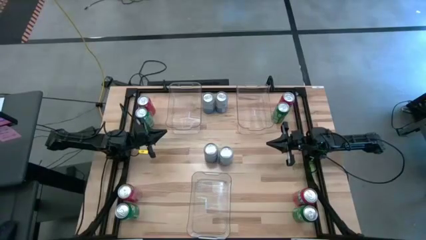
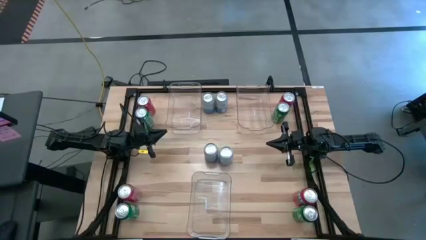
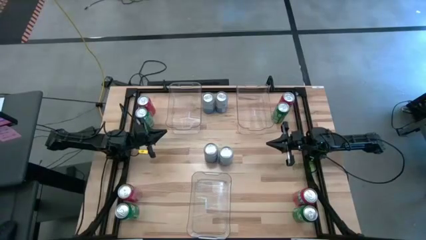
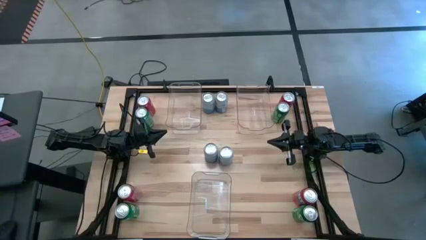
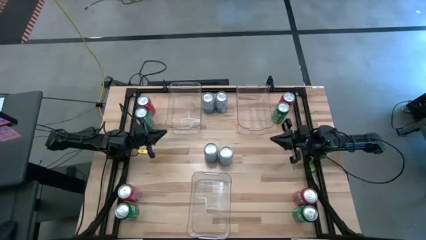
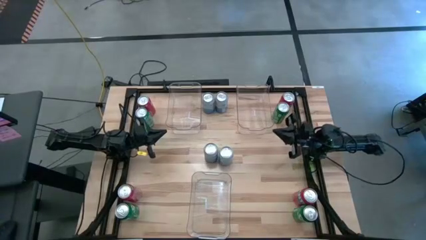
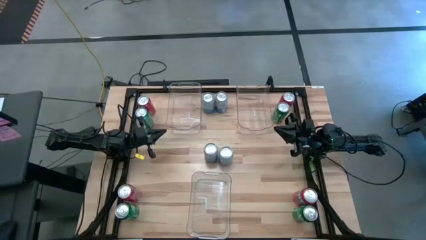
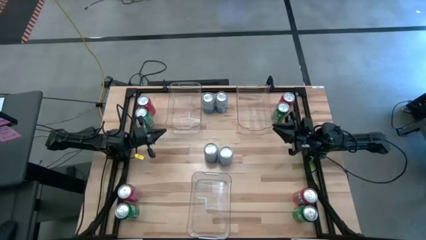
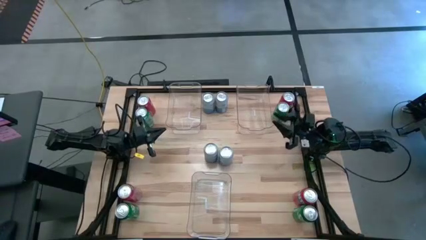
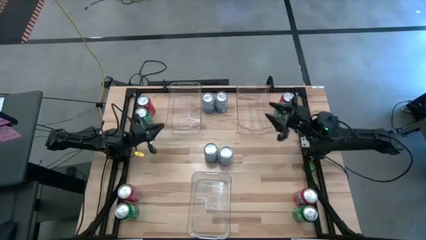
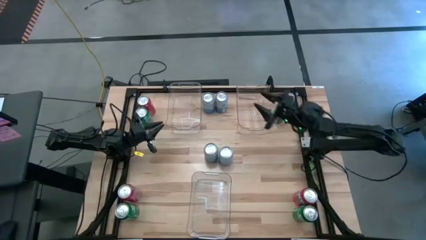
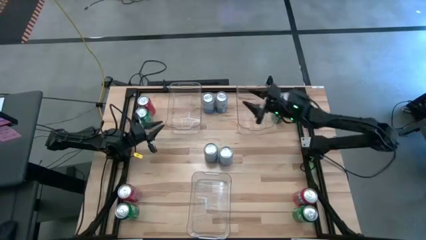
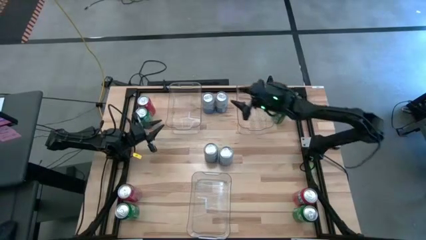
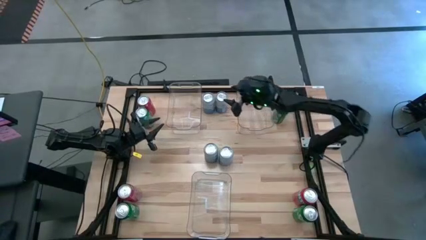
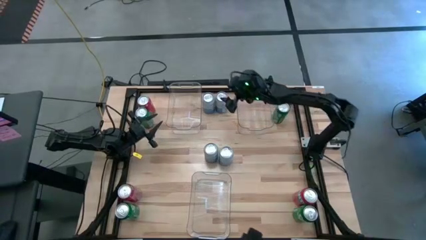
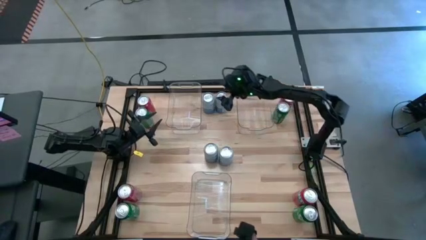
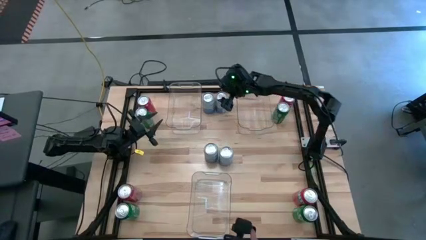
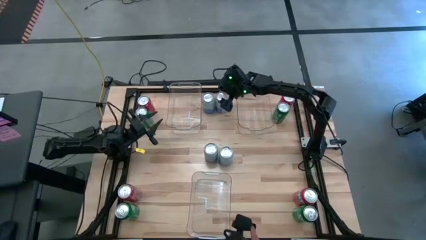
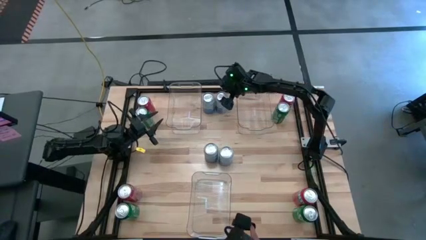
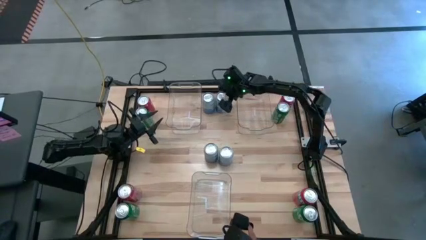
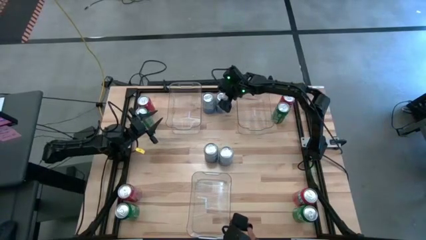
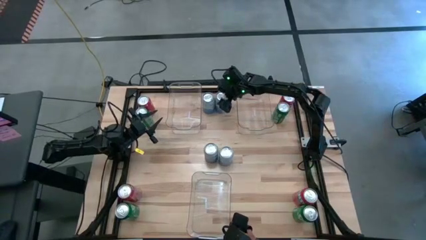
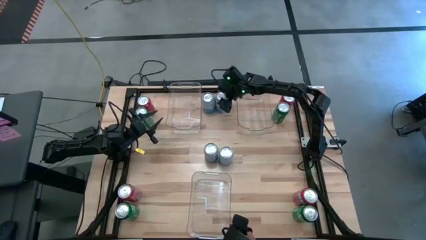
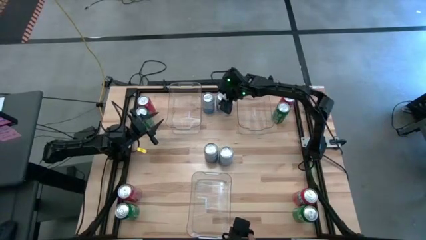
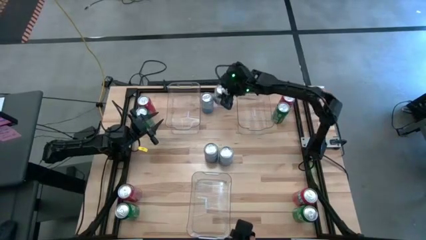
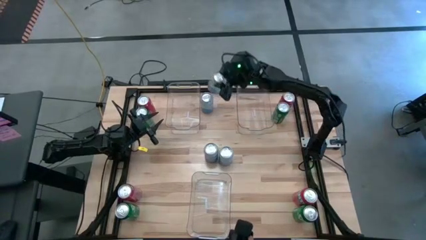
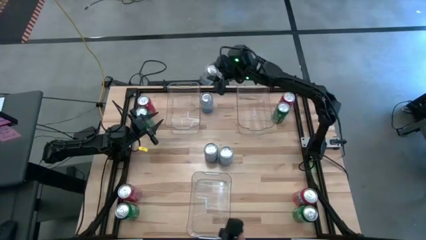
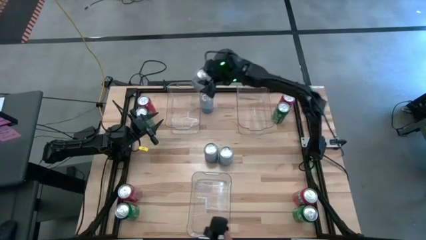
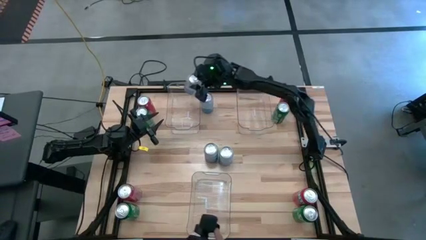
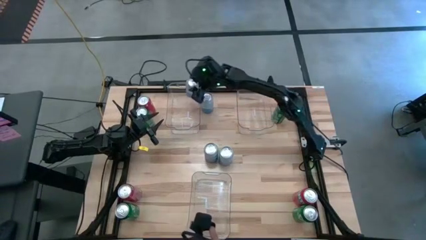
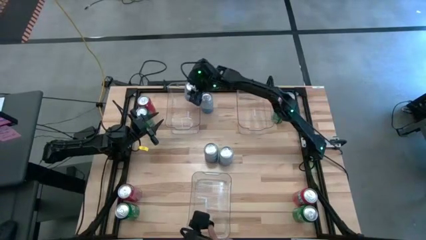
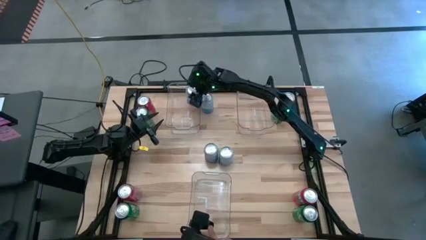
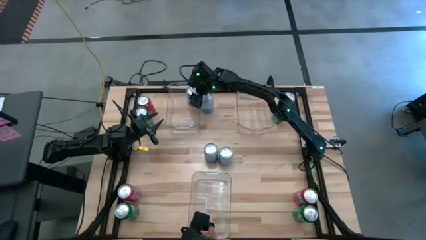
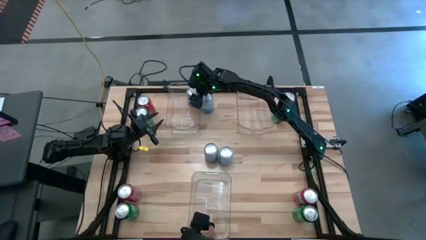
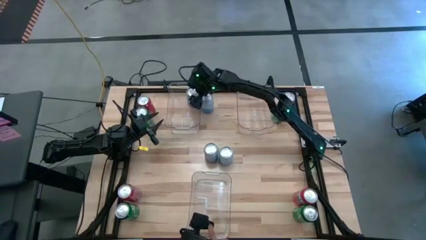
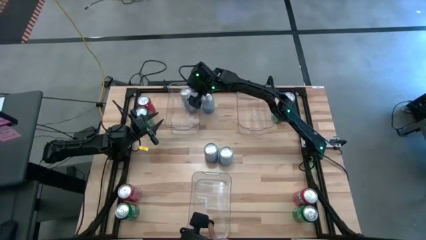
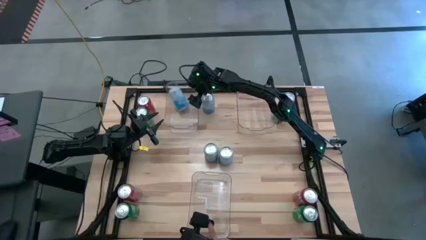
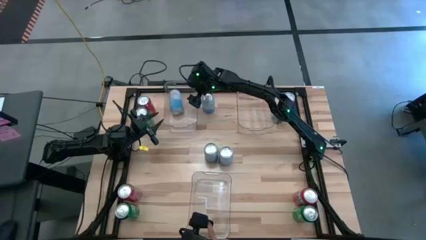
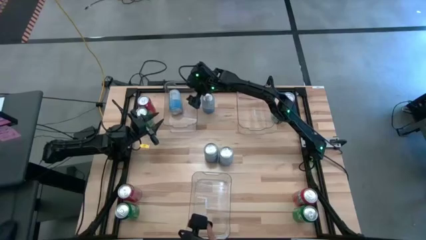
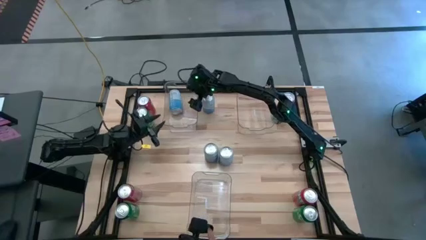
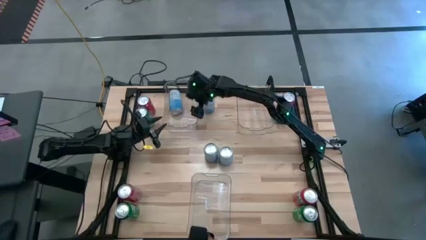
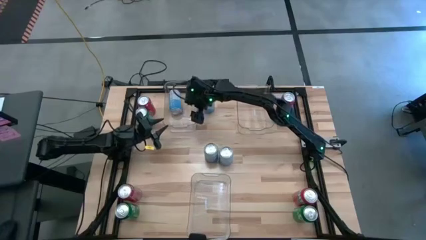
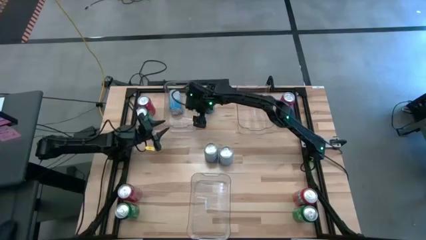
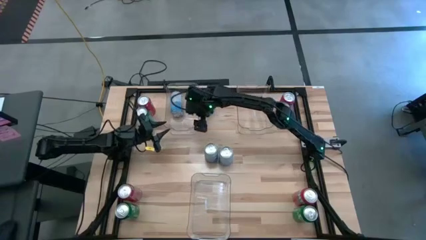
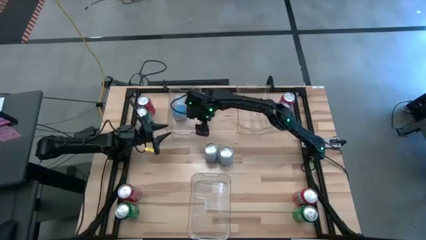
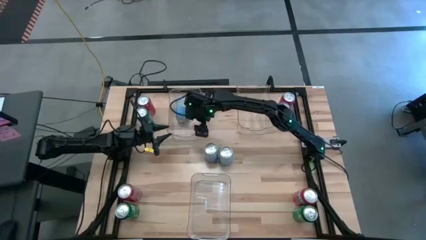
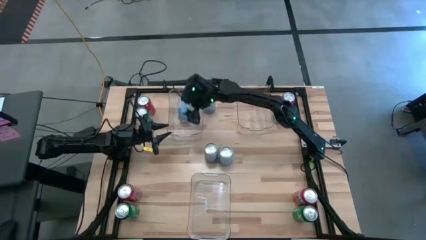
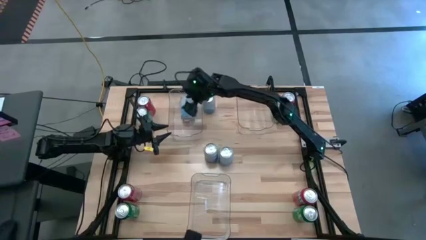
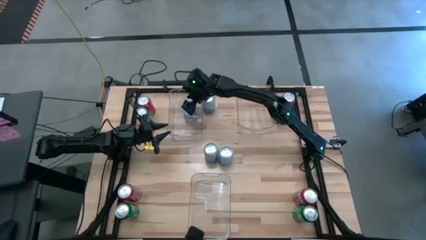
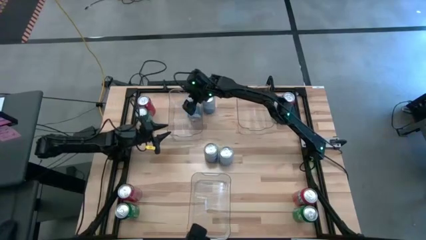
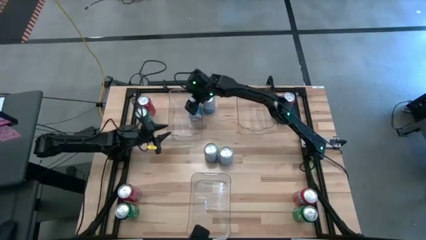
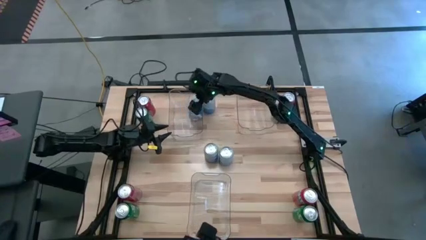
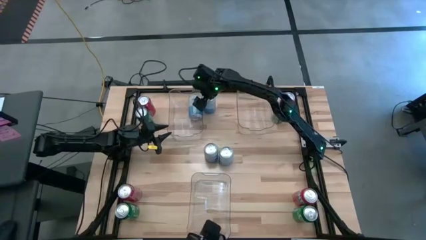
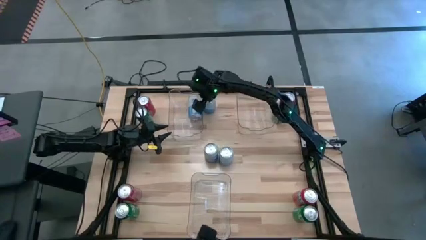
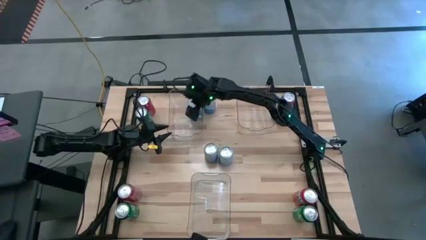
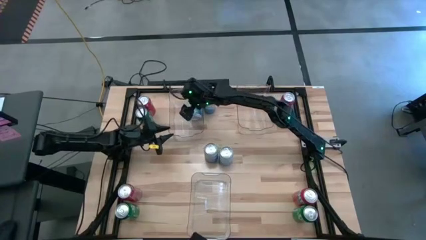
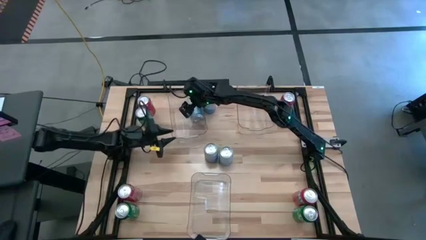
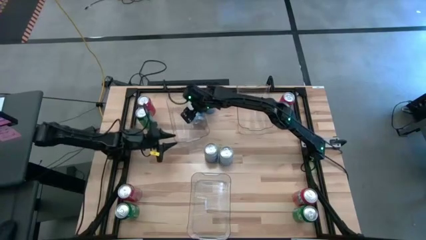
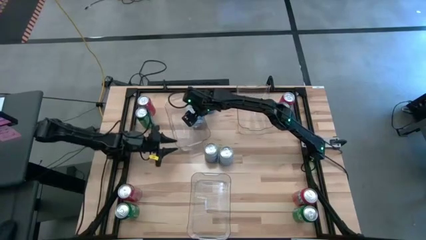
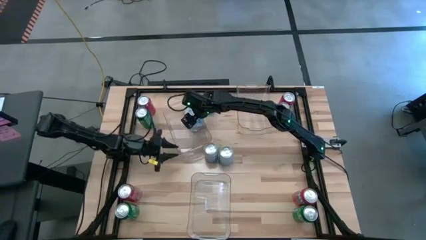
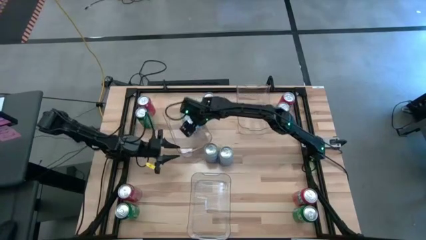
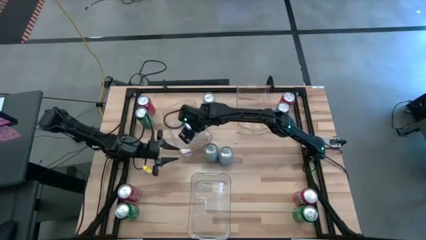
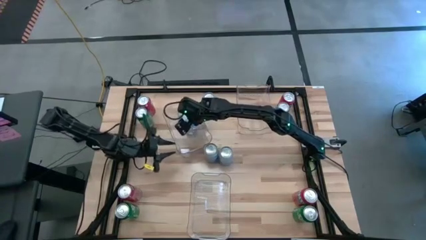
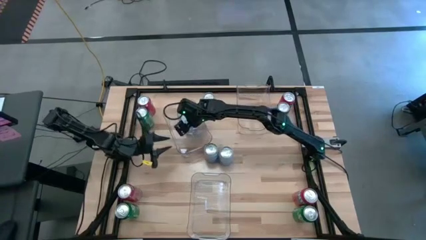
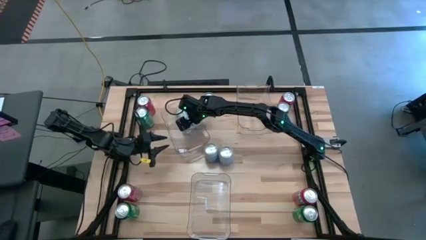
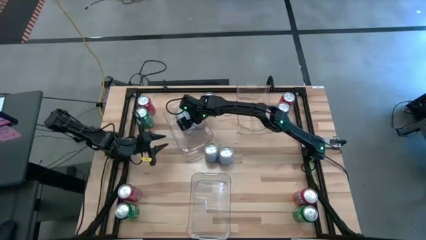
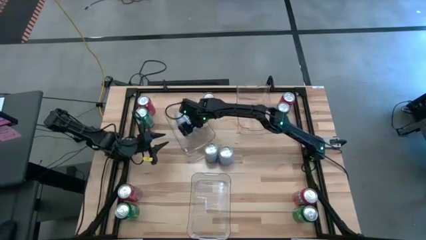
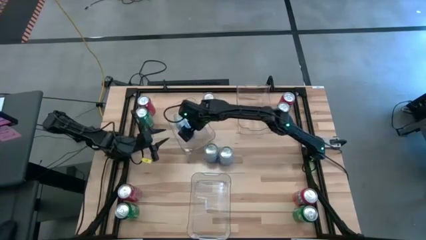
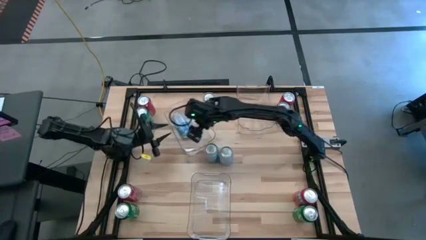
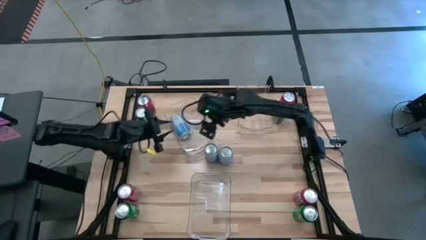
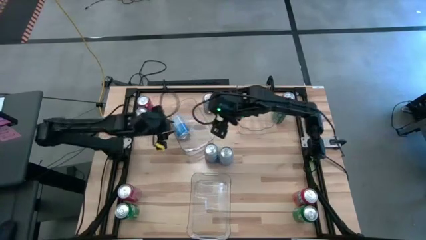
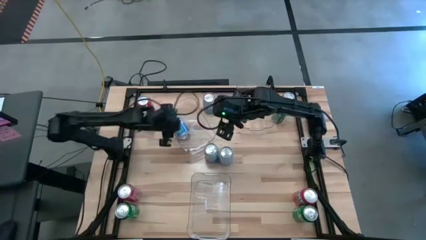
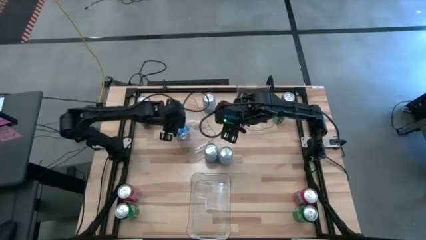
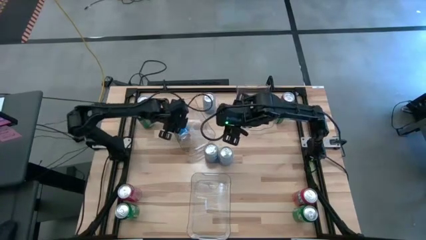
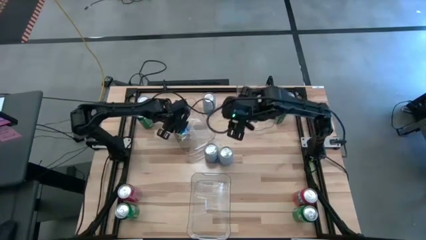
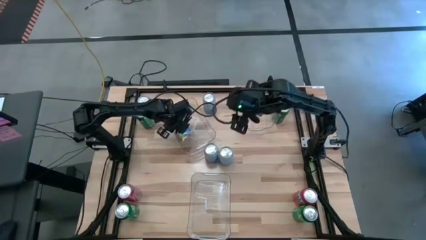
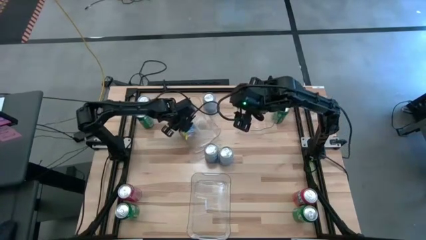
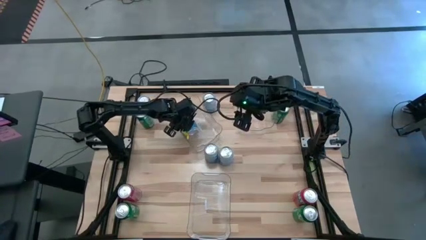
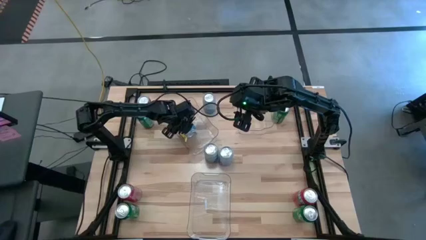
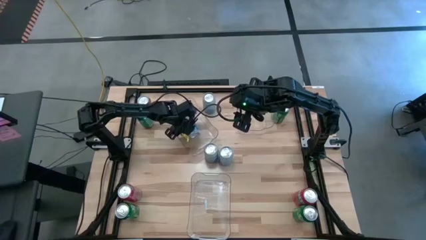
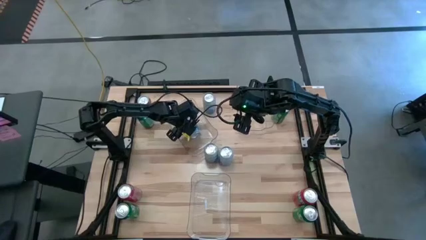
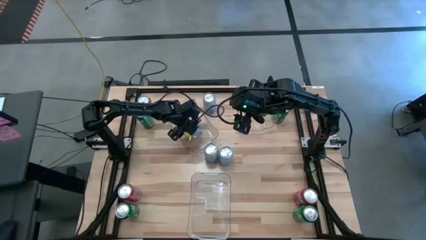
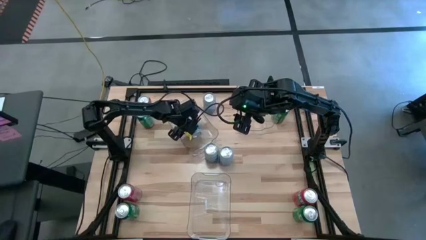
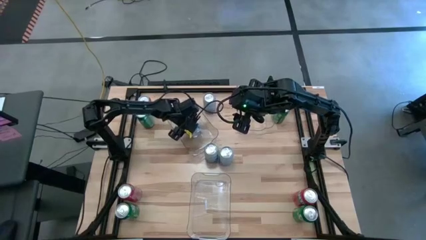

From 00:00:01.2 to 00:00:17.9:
Task: Sort soda cans
Put the top right blue-white soda can into the top left transparent bin
